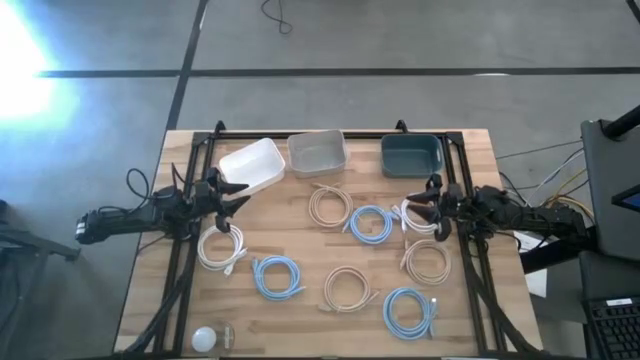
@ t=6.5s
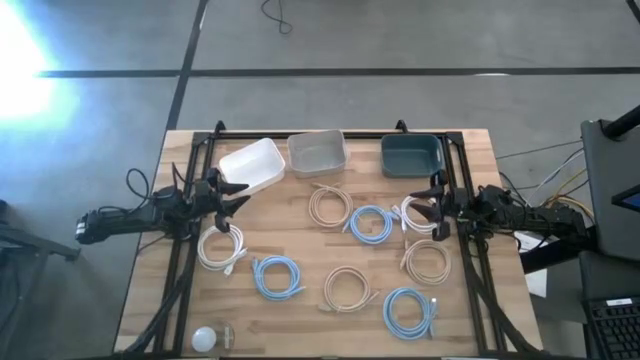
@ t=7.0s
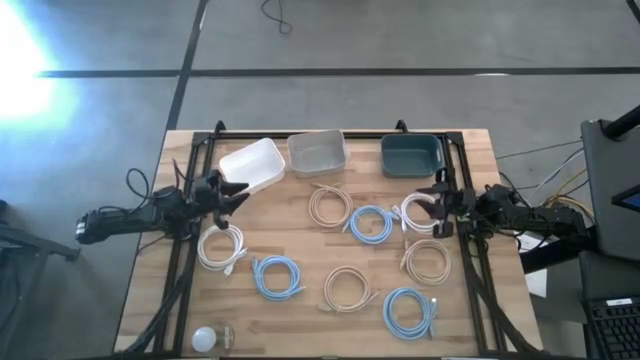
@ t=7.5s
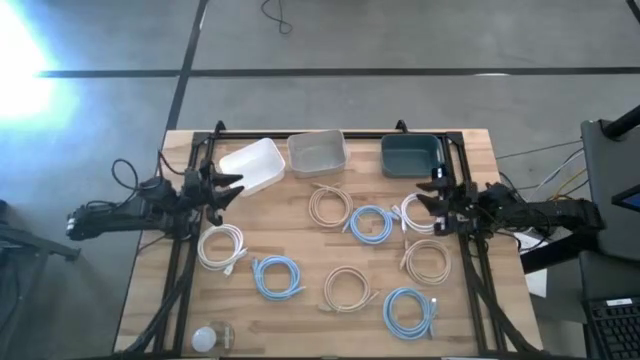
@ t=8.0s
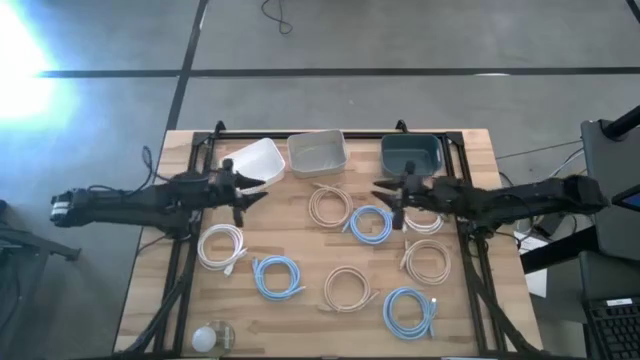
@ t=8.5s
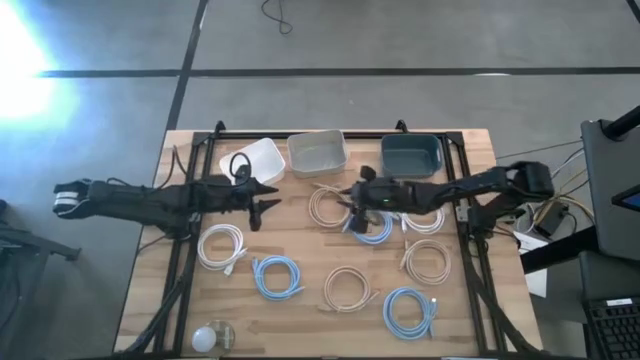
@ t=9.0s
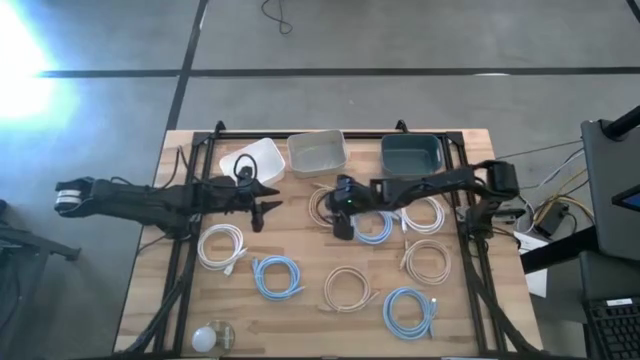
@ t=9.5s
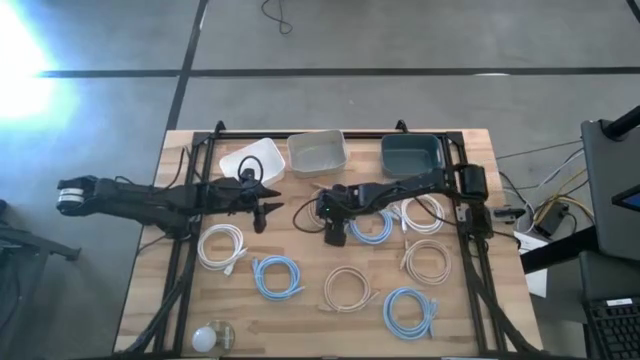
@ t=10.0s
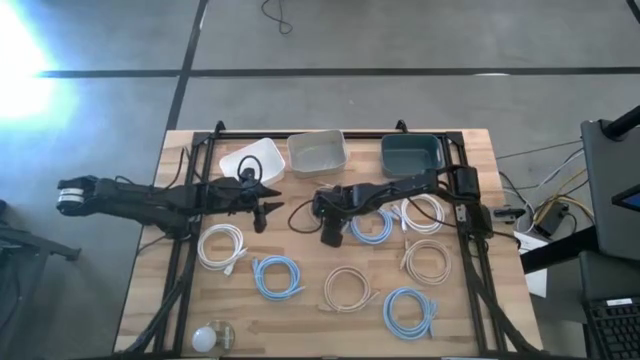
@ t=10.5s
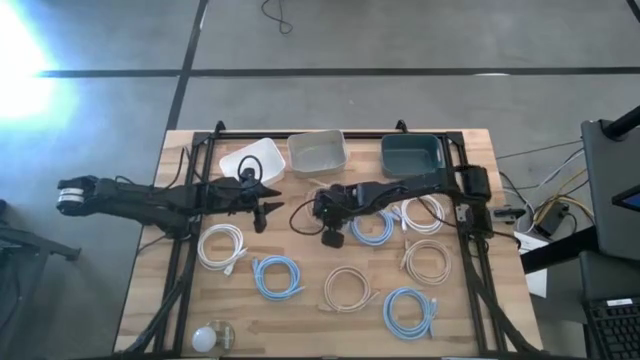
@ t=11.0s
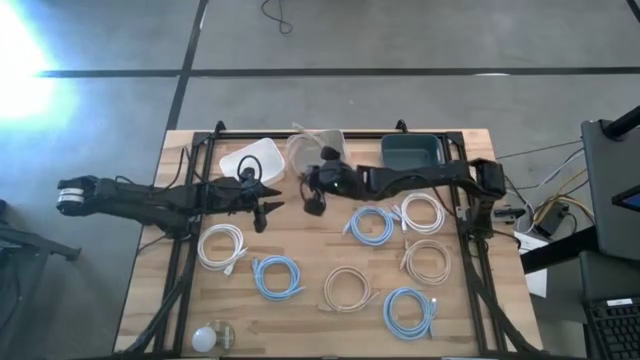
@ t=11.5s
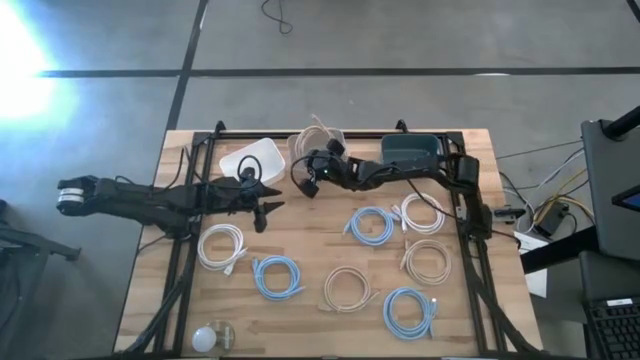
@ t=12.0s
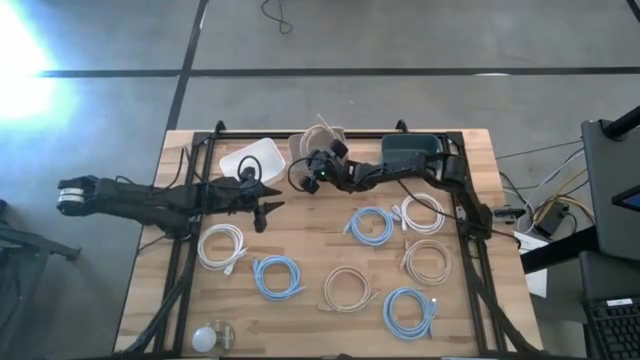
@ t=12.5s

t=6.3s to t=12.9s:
Task: Sort HDMI cables
Put the top light brown HDMI cable into the gray bin

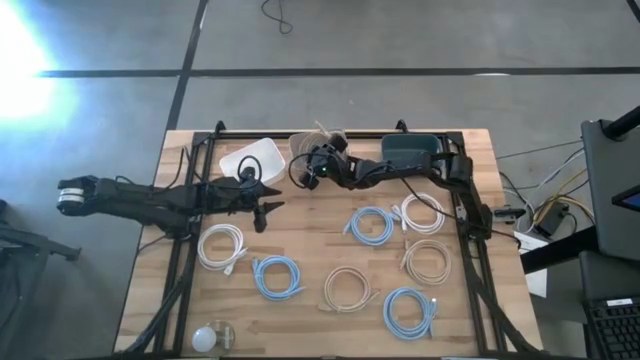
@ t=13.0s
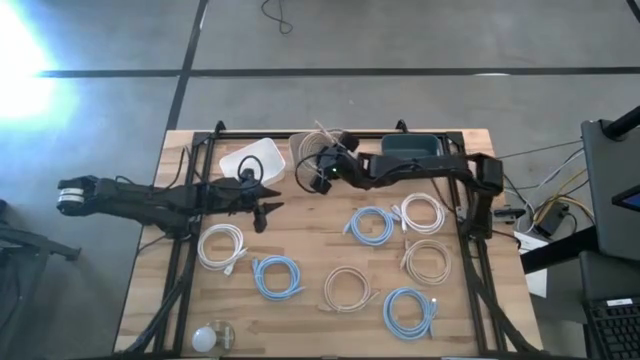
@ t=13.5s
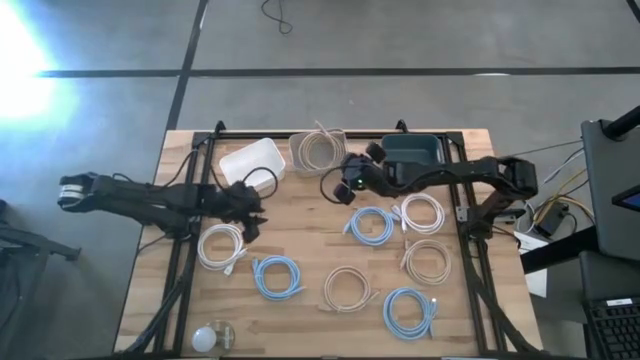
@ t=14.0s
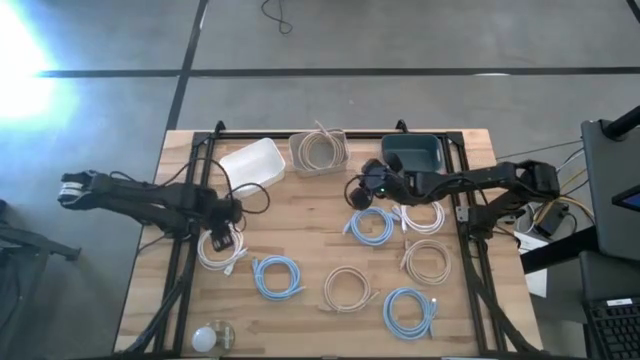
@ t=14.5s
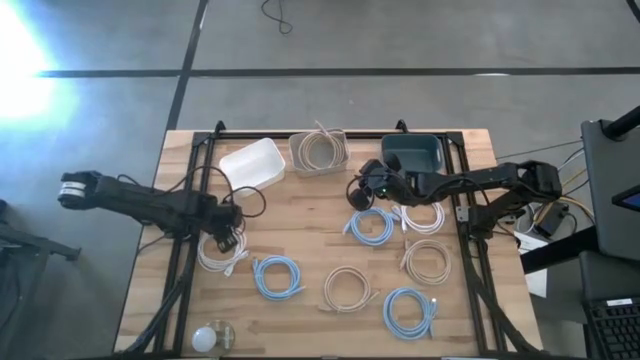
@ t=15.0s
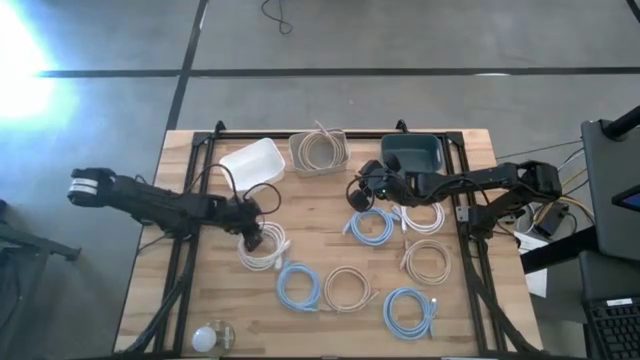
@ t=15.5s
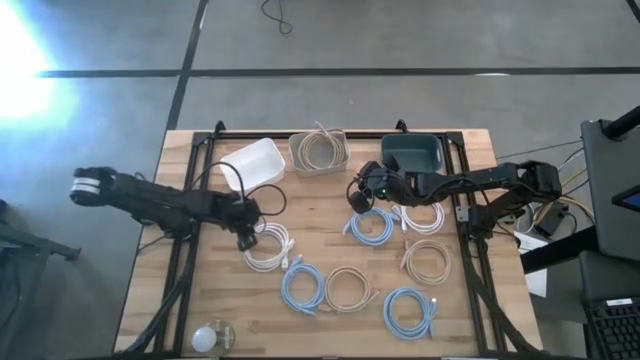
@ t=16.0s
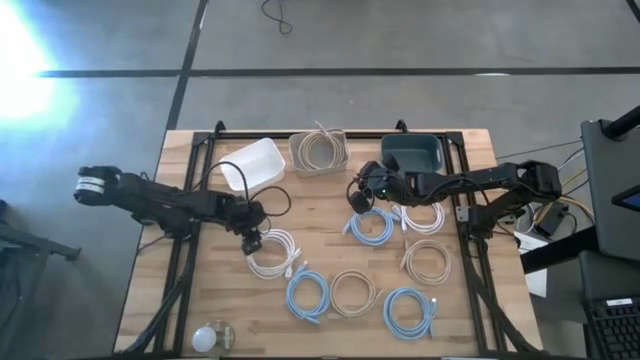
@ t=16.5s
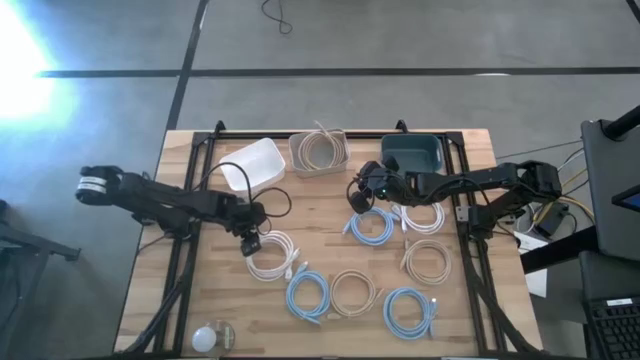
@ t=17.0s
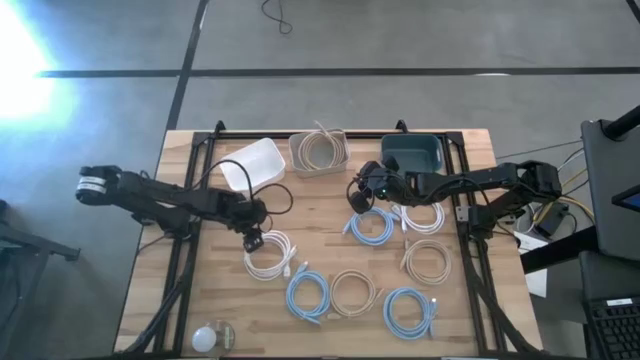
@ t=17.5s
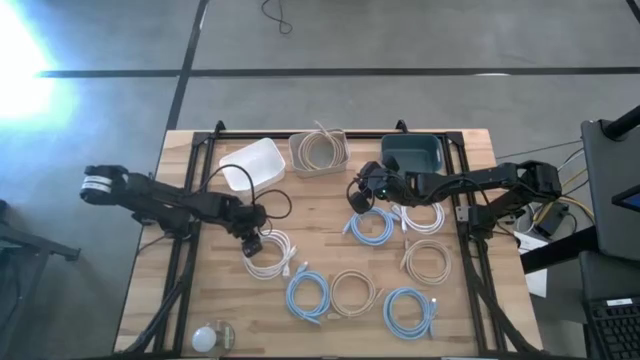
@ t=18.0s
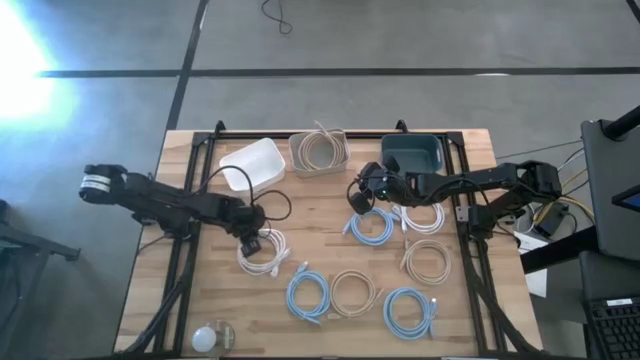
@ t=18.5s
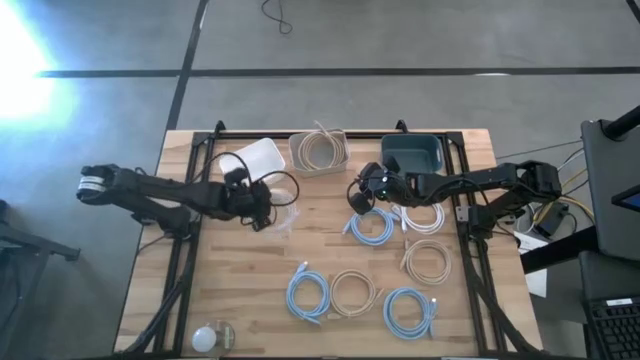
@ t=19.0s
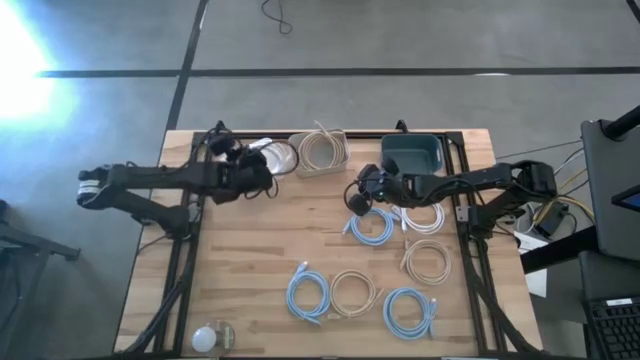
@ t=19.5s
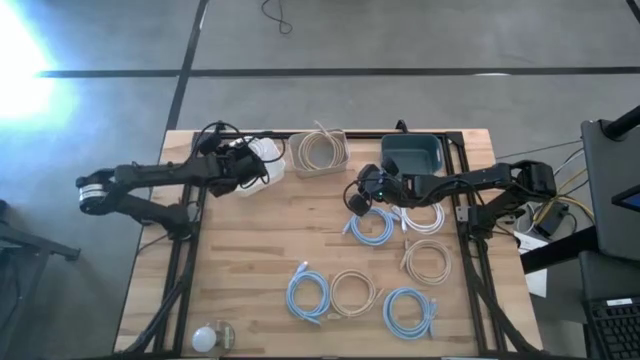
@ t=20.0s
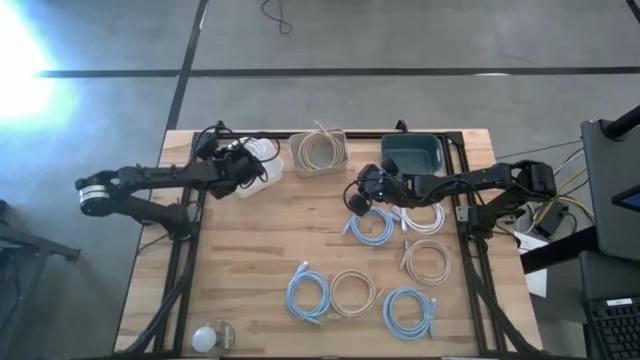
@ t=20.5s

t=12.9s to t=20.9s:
Put the left white HDMI cable into the white bin

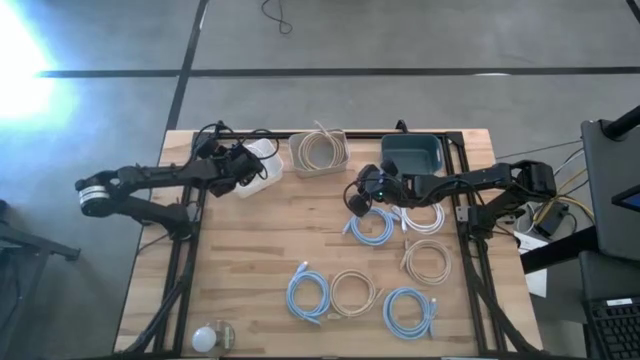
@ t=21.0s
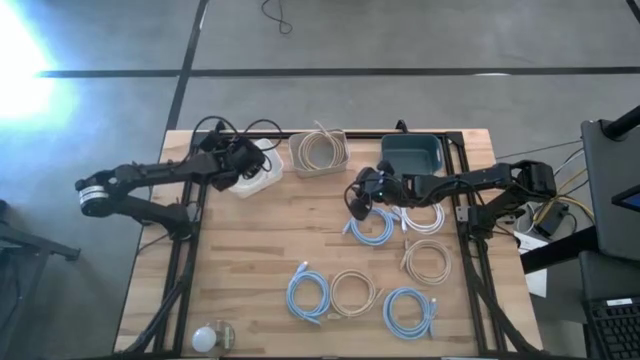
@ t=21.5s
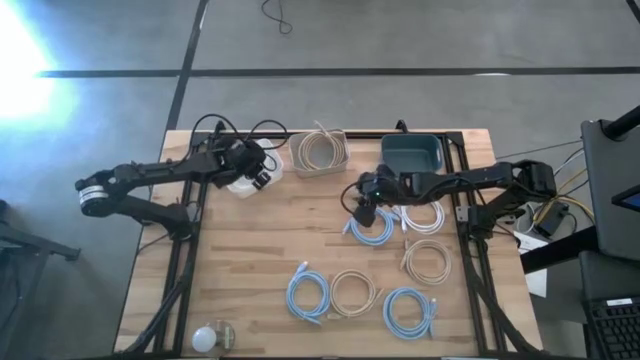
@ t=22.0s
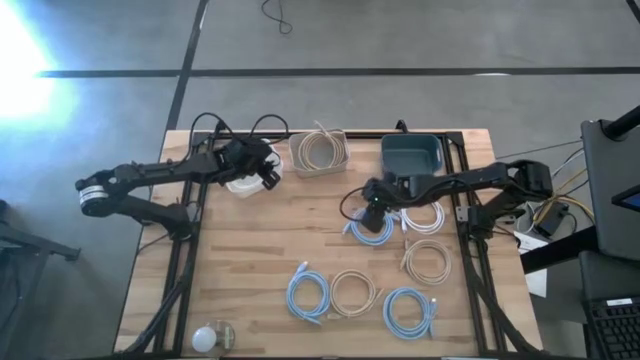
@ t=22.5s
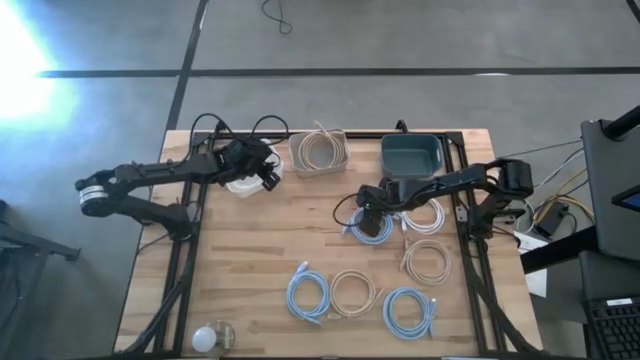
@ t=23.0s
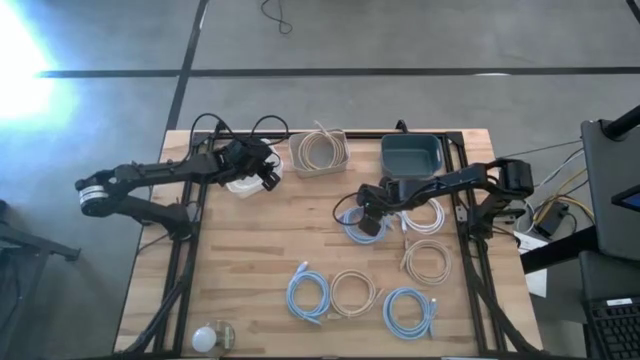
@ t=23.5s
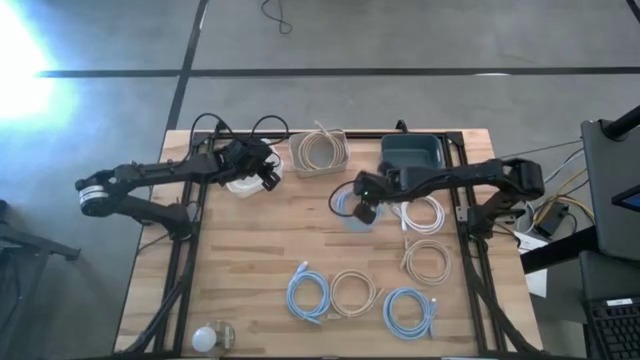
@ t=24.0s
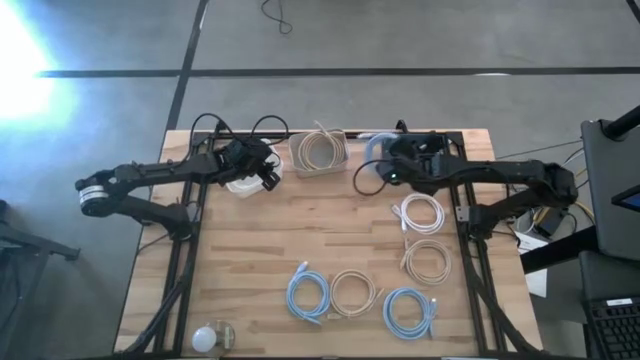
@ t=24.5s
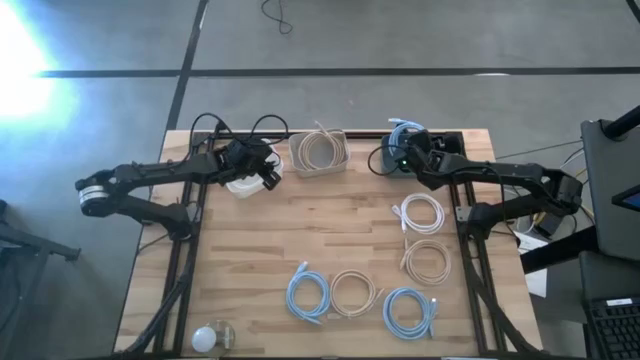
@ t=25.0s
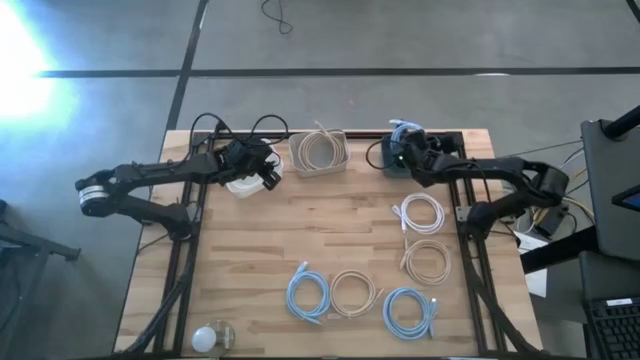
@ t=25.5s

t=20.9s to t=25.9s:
Put the top light blue HDMI cable into the blue bin

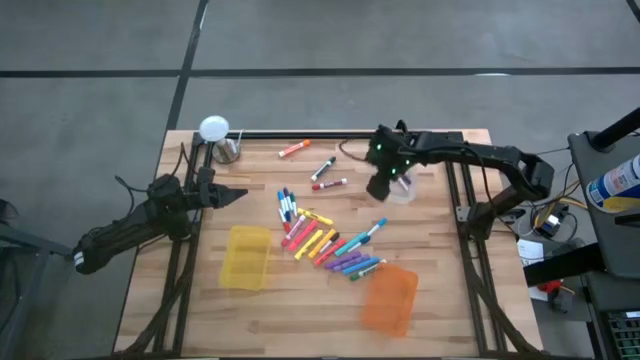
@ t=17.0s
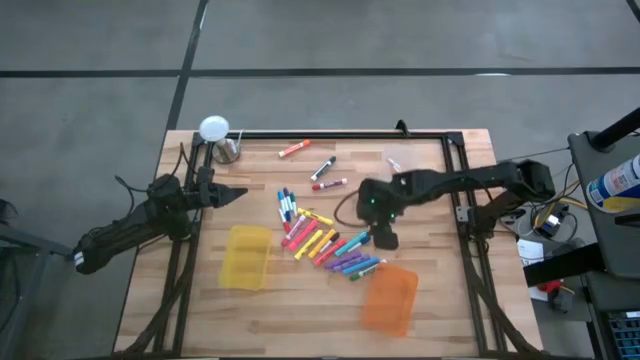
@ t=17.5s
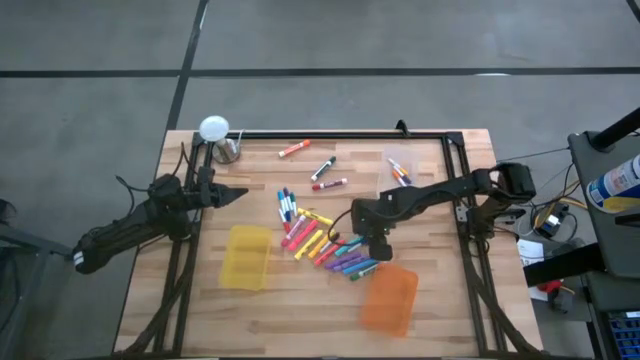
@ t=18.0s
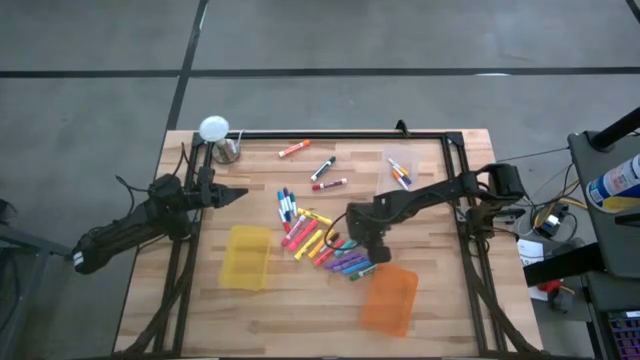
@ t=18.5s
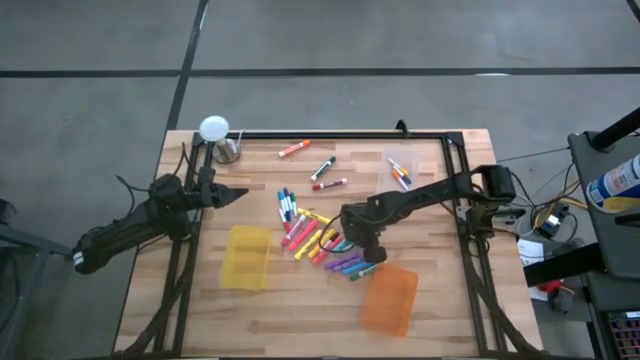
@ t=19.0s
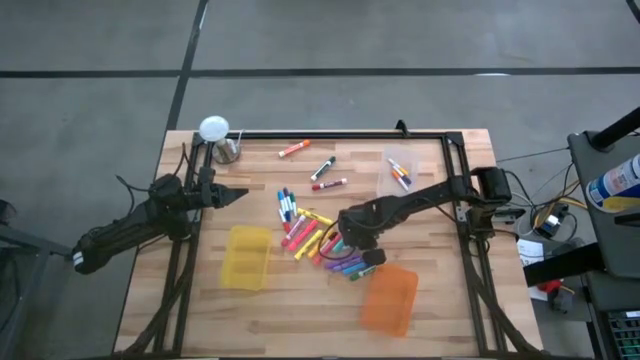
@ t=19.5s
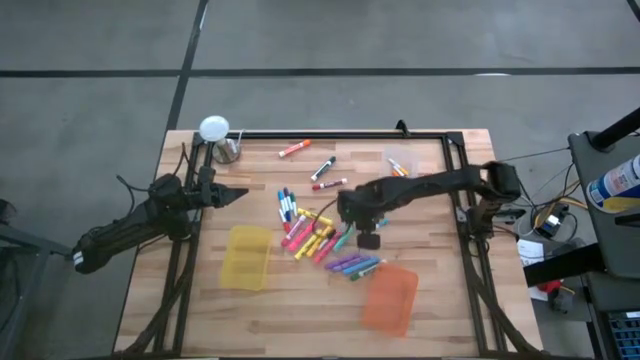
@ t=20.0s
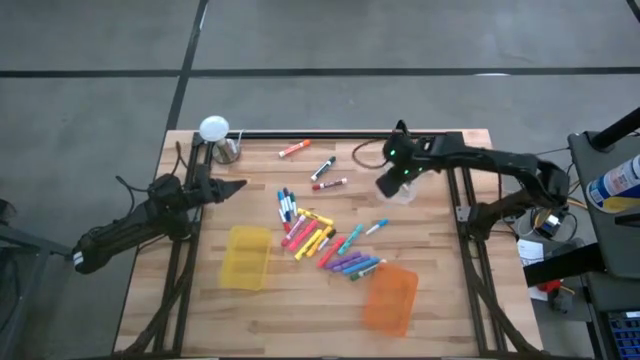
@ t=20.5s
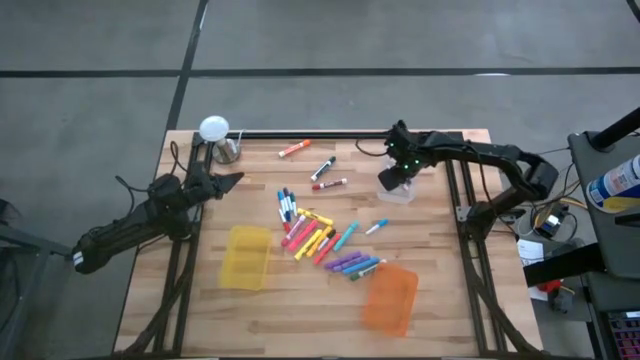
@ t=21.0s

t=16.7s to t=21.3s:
Task: Pick & Place Markers
Put the bottom small dark blue highlighter pen into the transparent bin
